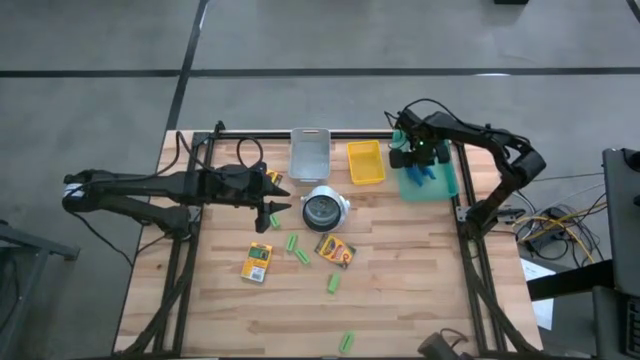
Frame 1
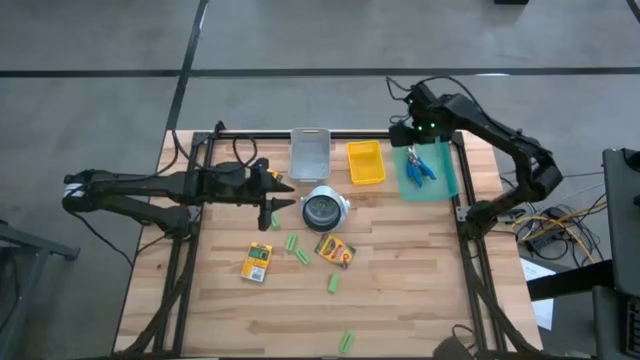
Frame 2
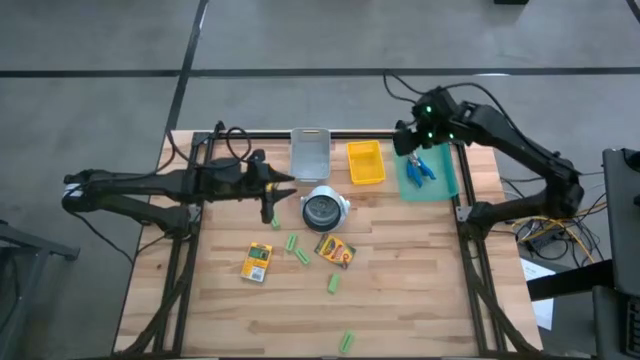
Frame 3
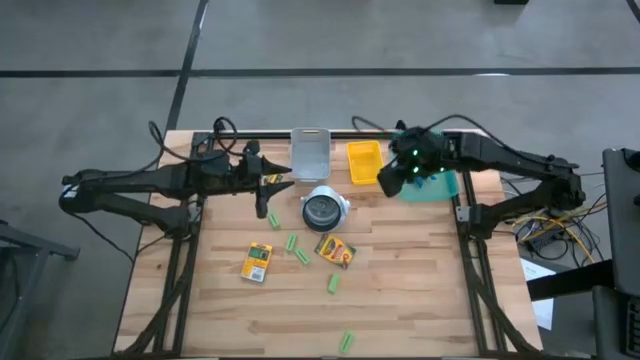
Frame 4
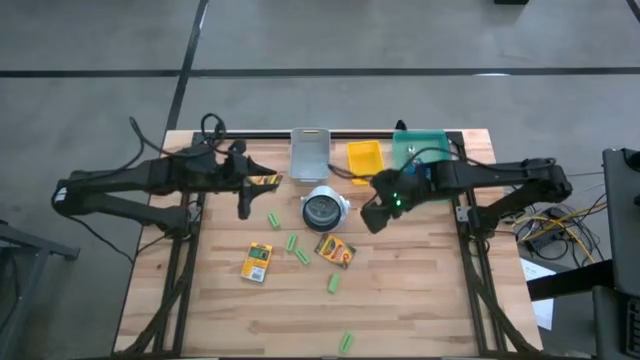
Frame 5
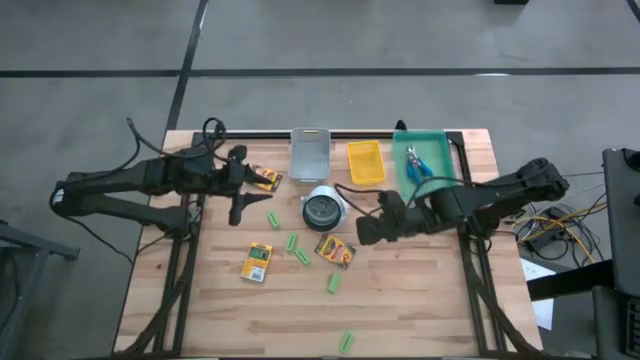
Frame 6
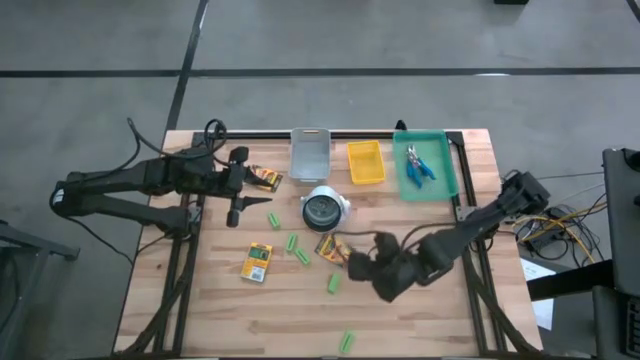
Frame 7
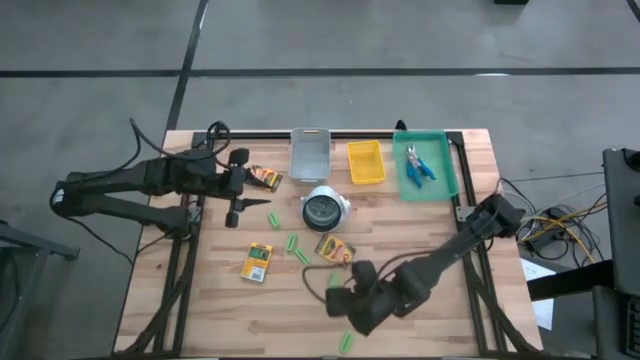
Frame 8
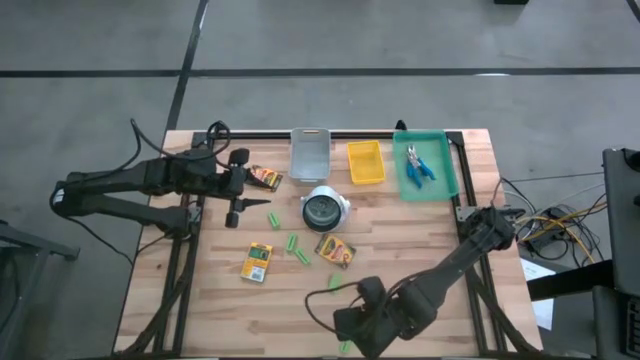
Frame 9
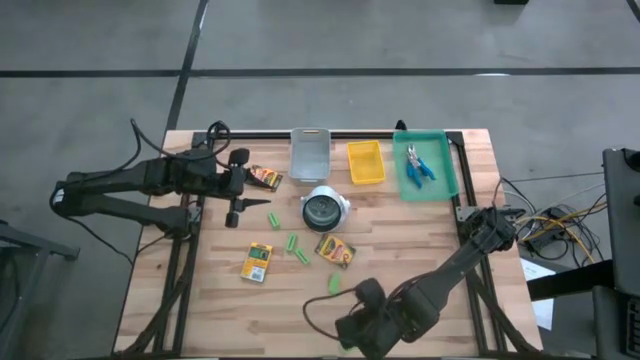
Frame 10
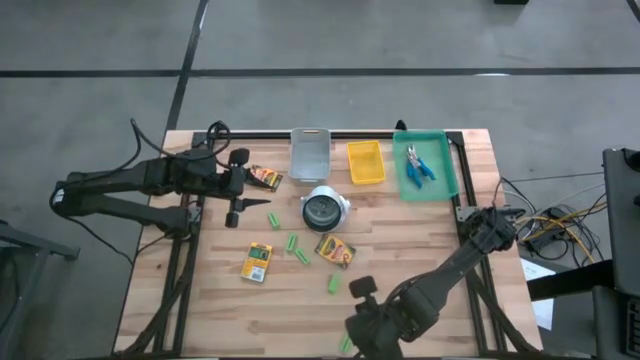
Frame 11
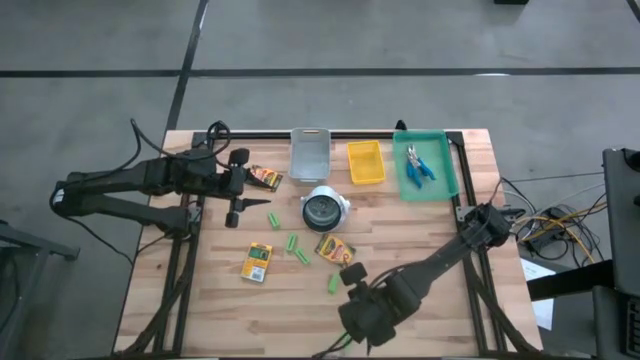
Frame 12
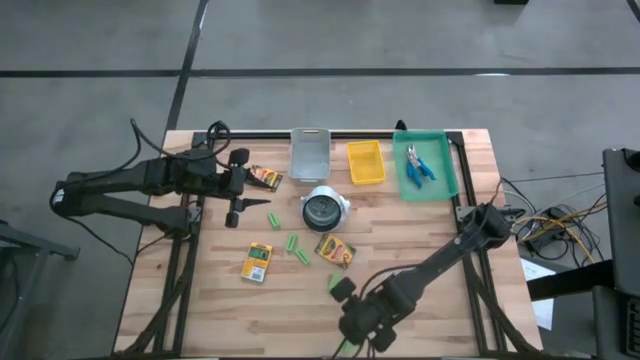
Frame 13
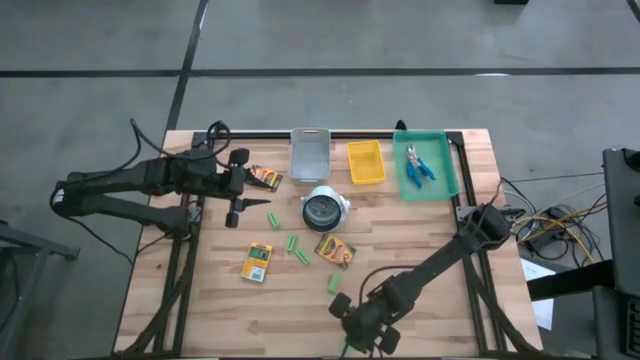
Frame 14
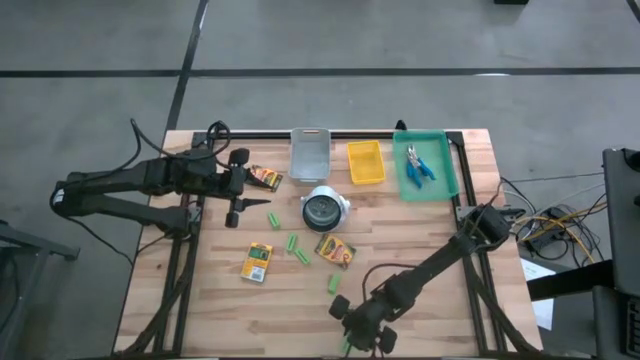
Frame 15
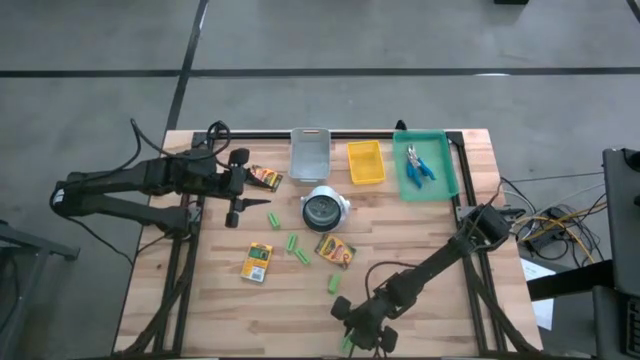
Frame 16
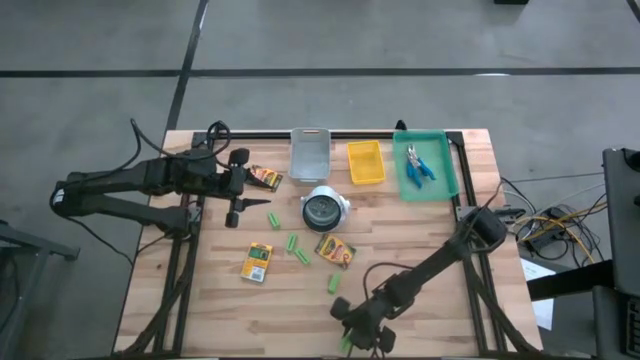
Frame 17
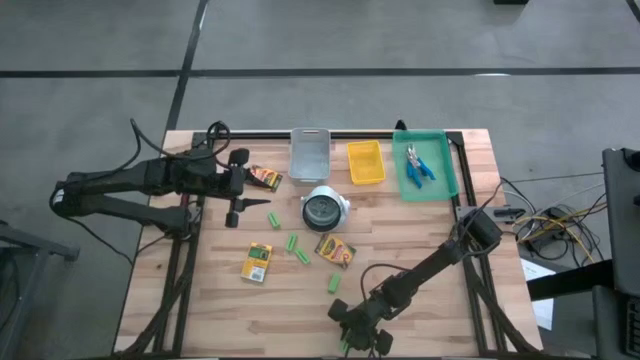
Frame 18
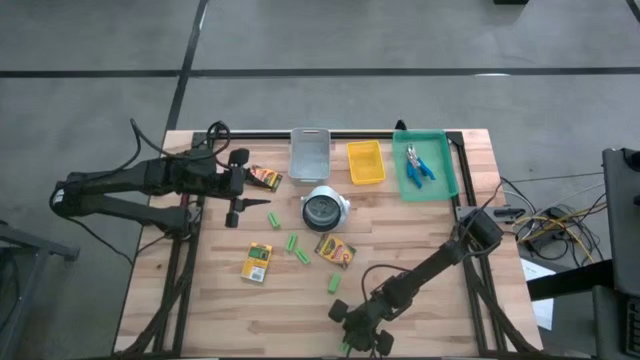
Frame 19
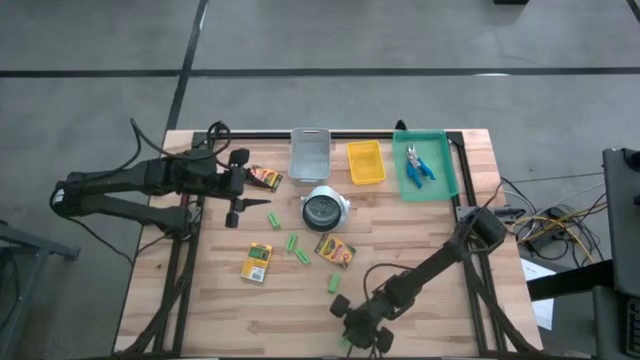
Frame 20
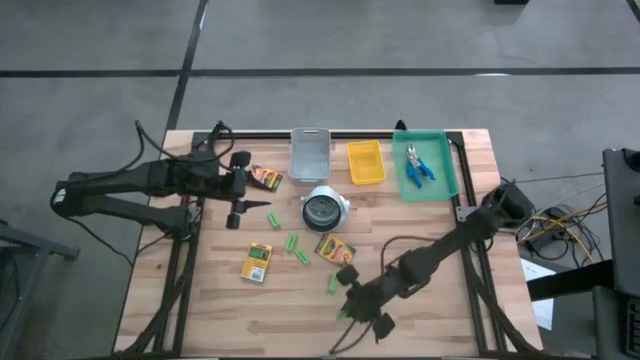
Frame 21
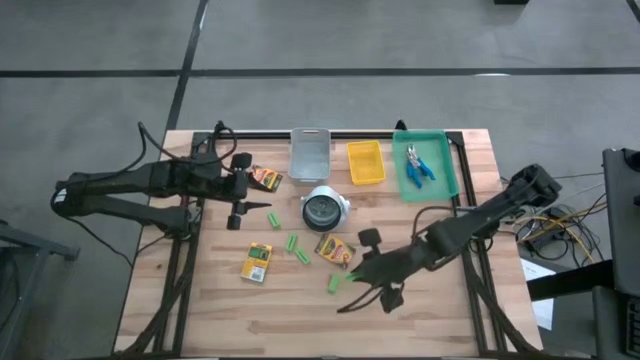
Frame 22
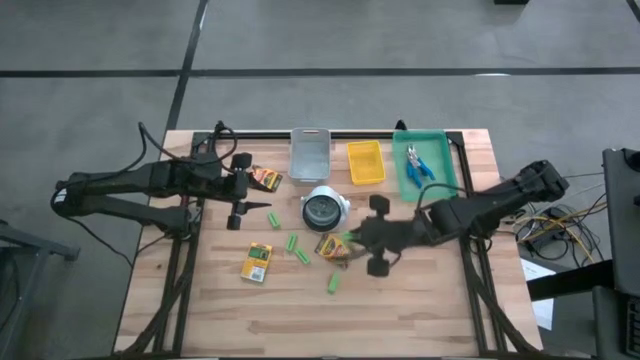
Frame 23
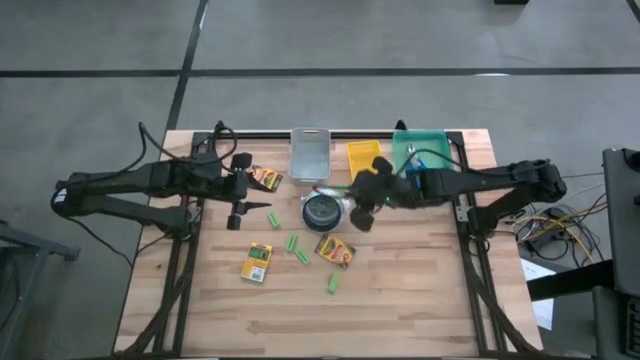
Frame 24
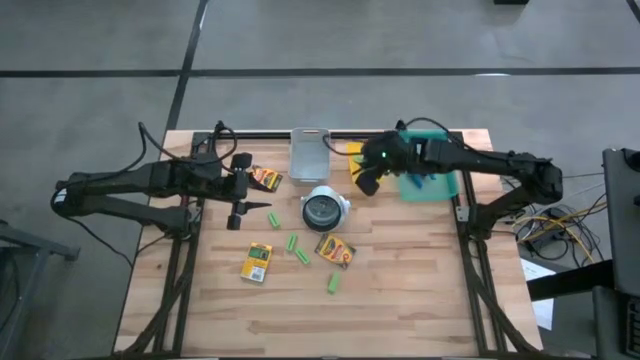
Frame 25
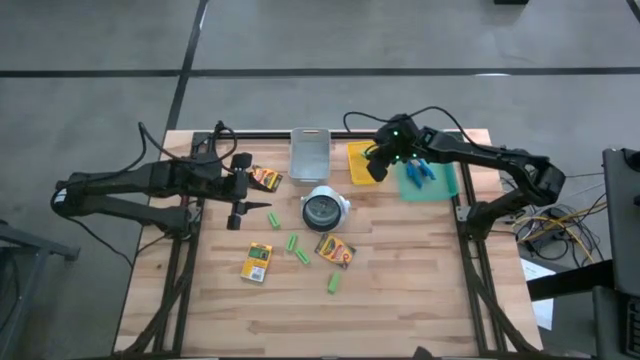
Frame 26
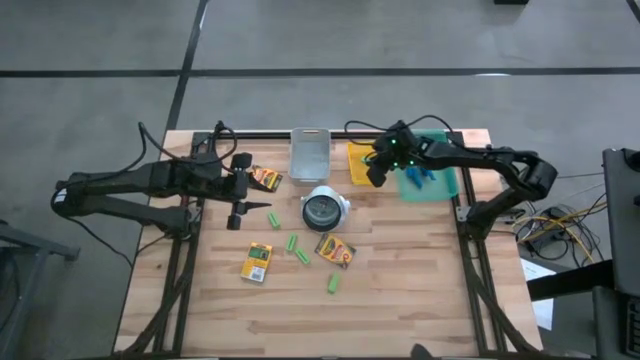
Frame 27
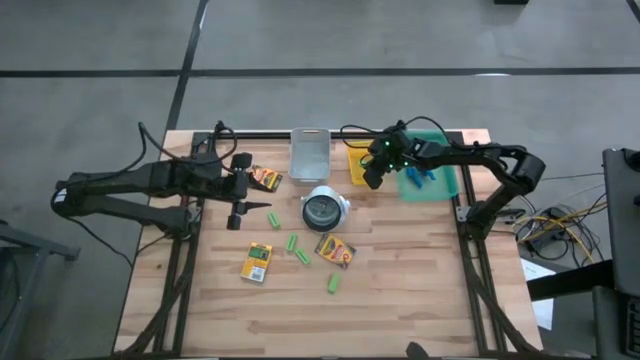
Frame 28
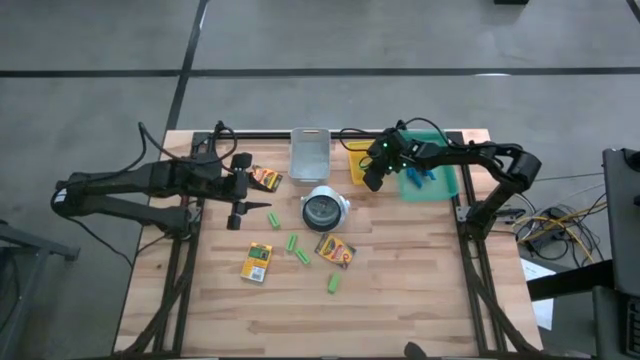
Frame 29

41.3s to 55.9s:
Task: Pick & Place School Supplies
Put the green eraser into the yellow bin

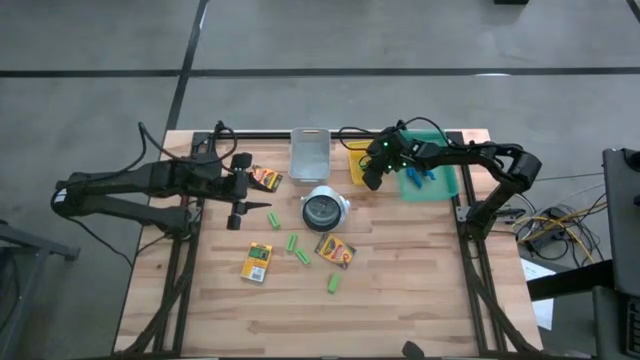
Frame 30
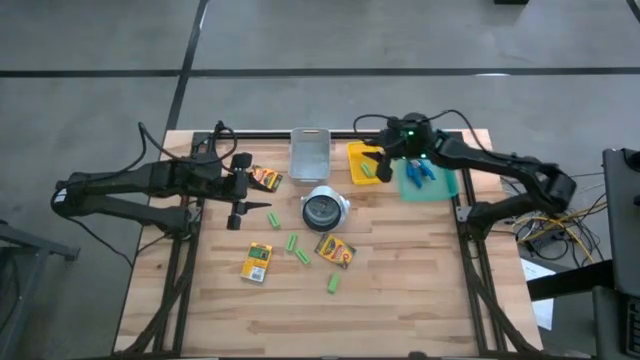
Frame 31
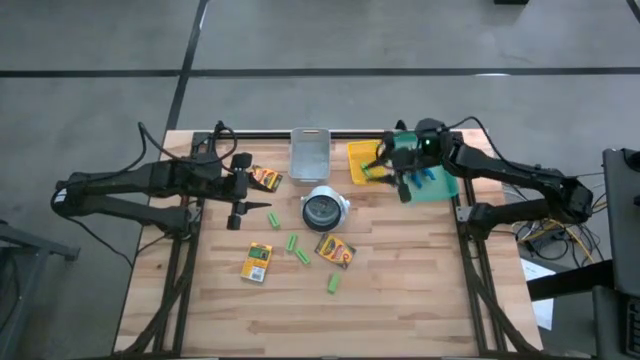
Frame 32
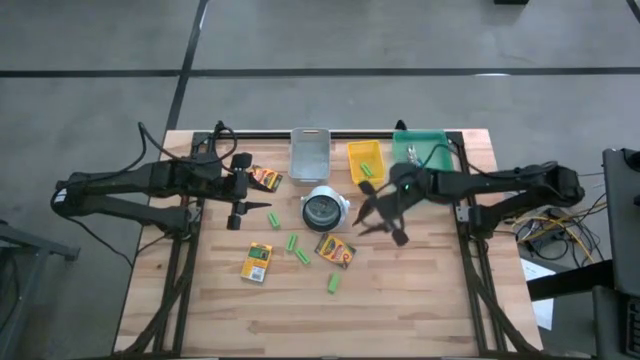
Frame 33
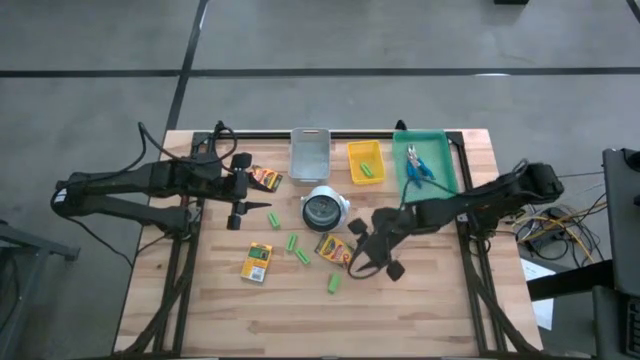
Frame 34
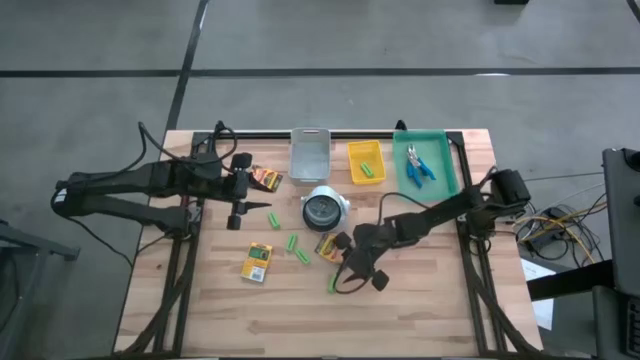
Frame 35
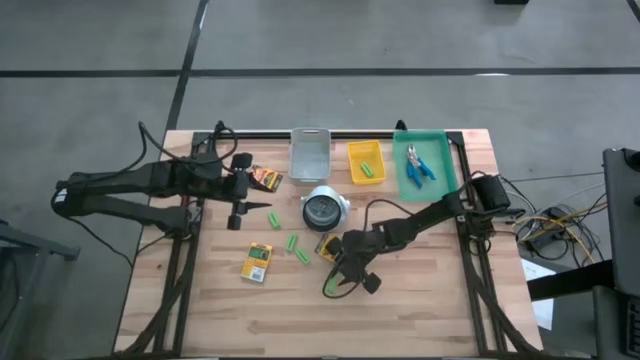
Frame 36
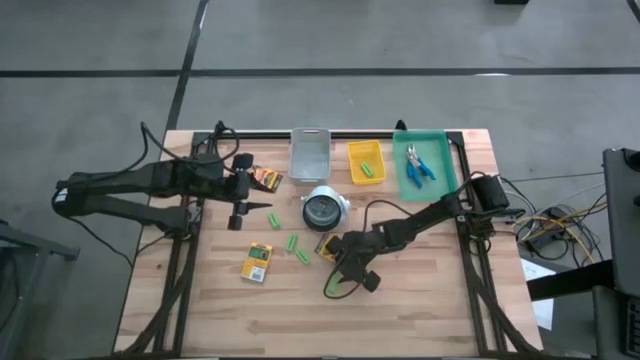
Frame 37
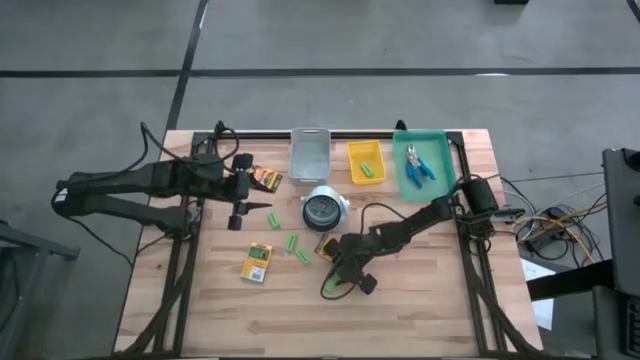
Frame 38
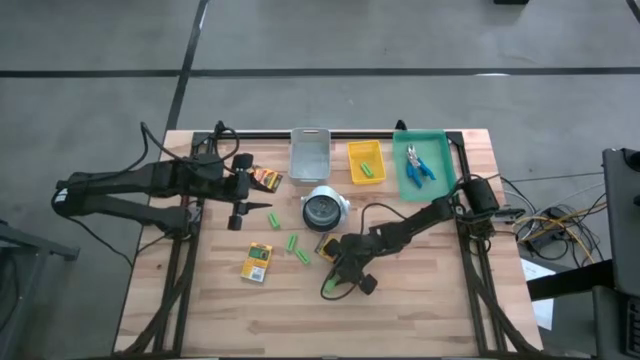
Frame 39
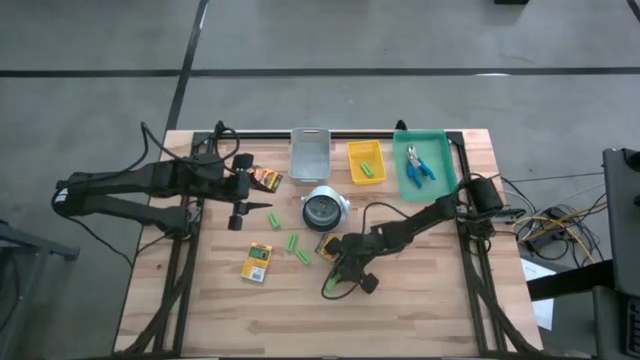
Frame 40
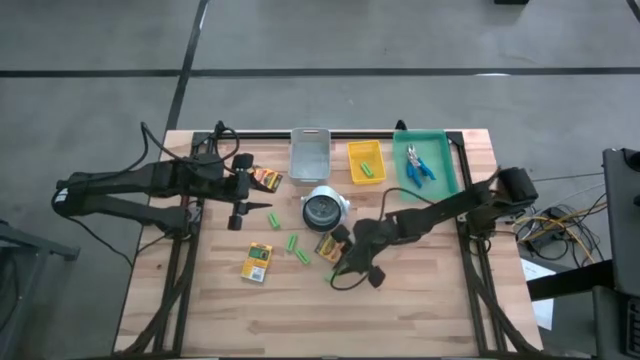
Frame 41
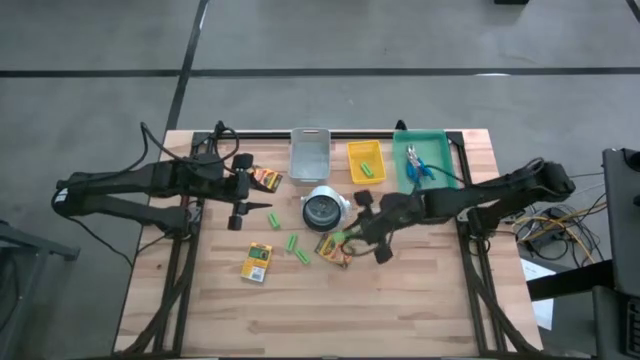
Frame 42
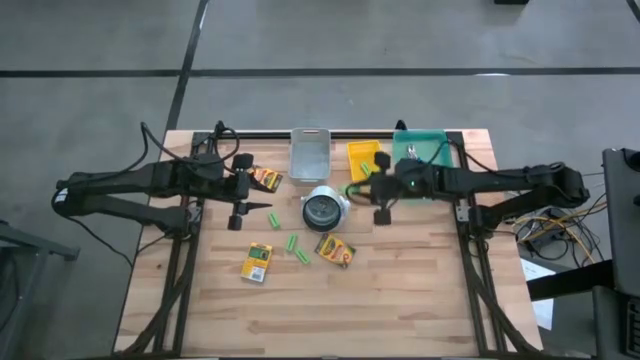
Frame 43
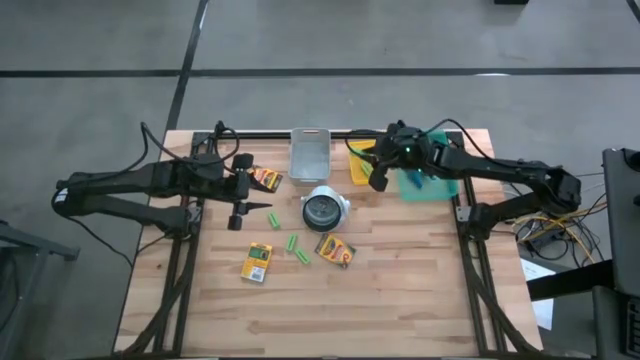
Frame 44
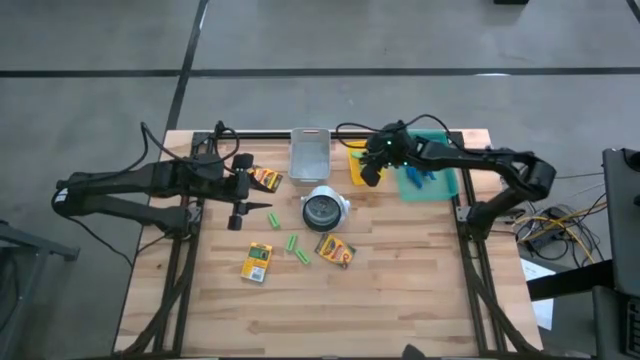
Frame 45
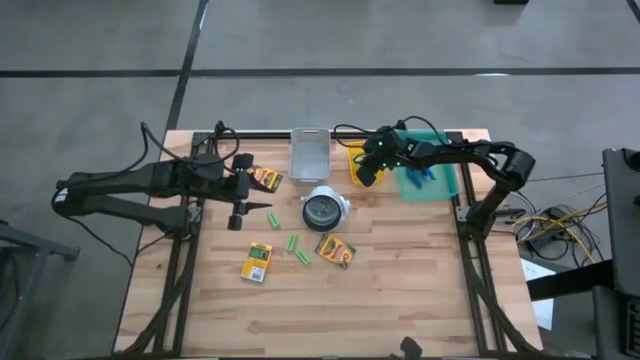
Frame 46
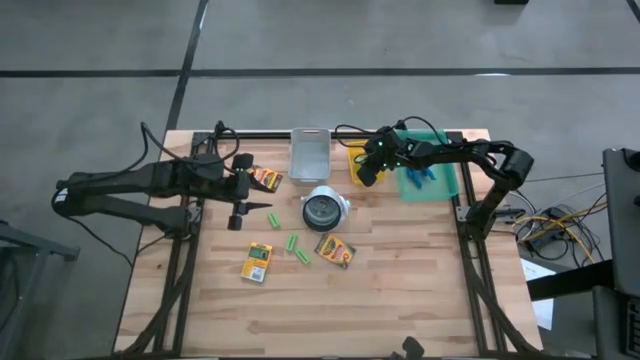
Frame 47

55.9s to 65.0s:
Put the green eraser into the yellow bin
